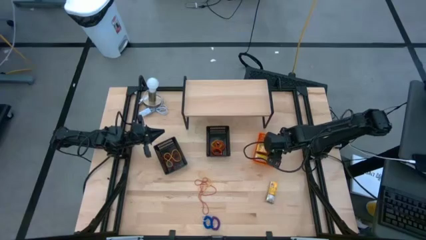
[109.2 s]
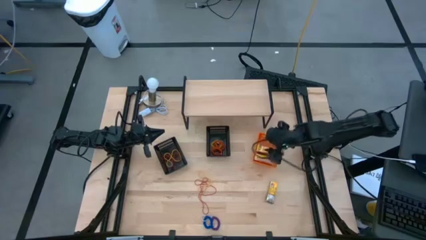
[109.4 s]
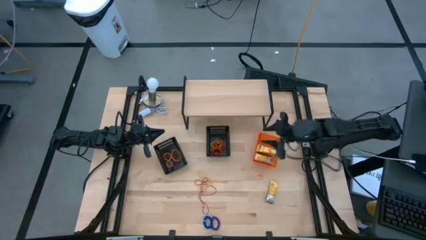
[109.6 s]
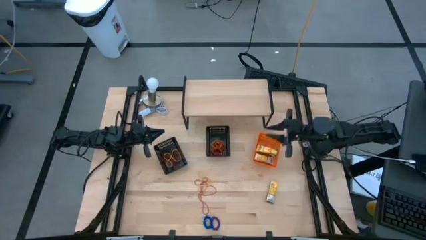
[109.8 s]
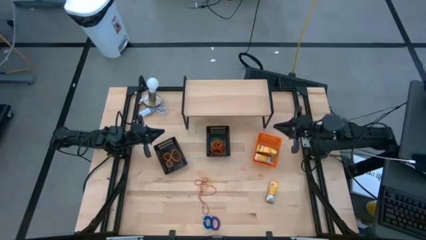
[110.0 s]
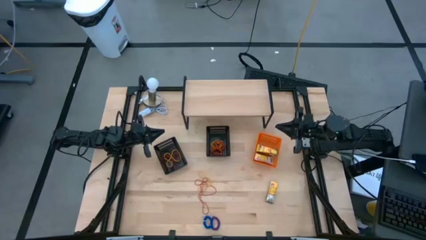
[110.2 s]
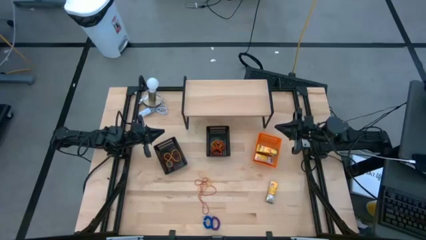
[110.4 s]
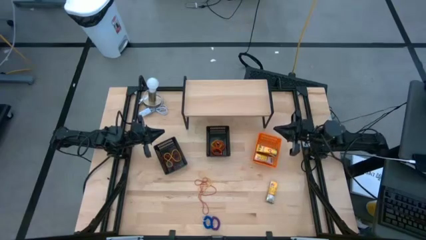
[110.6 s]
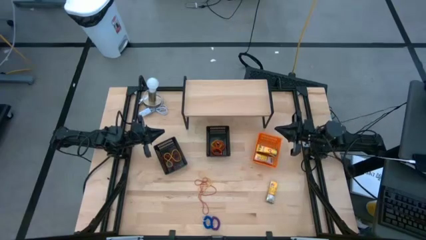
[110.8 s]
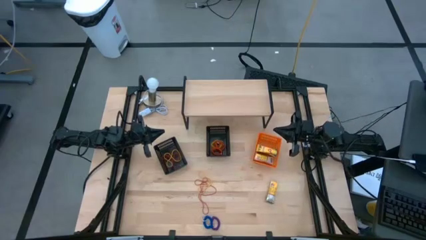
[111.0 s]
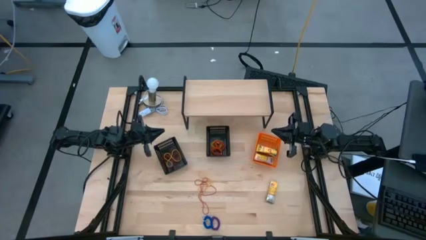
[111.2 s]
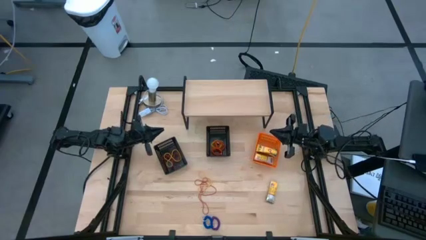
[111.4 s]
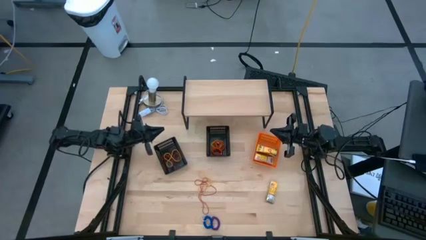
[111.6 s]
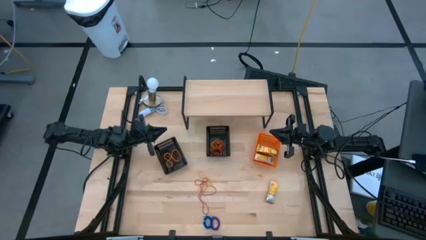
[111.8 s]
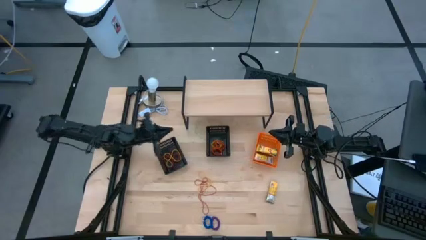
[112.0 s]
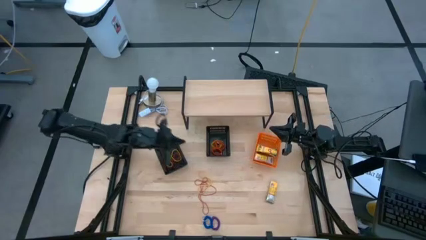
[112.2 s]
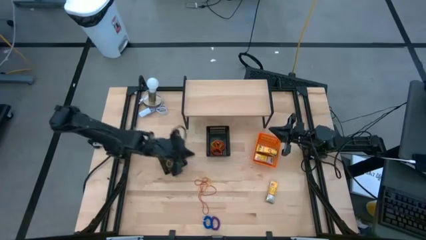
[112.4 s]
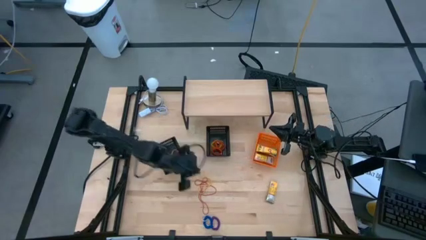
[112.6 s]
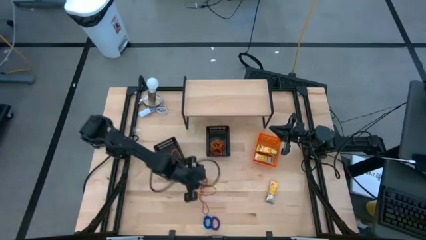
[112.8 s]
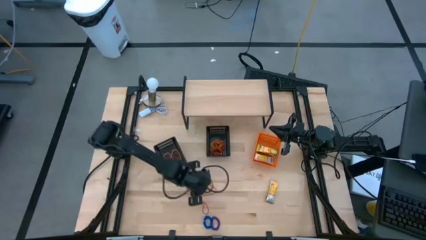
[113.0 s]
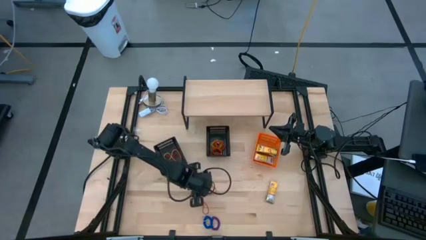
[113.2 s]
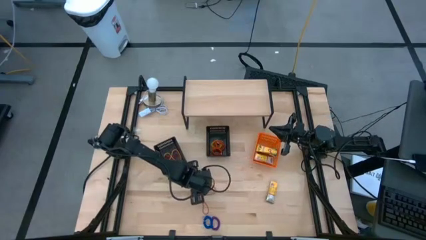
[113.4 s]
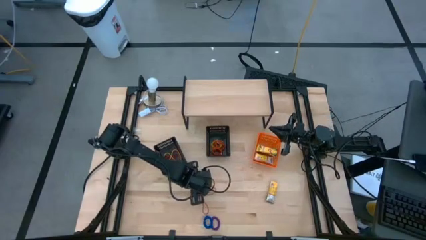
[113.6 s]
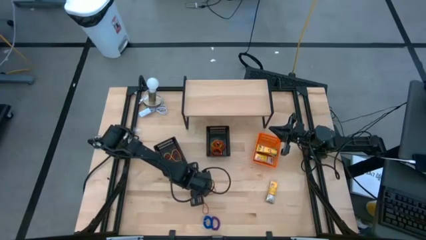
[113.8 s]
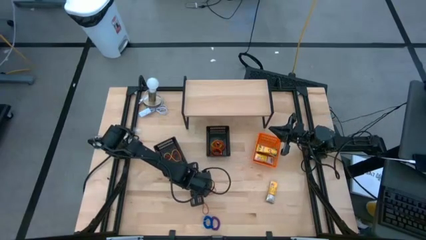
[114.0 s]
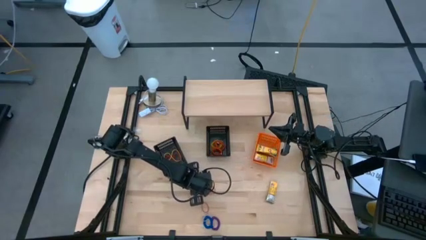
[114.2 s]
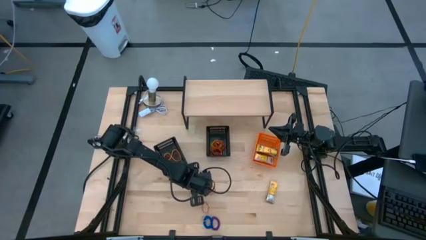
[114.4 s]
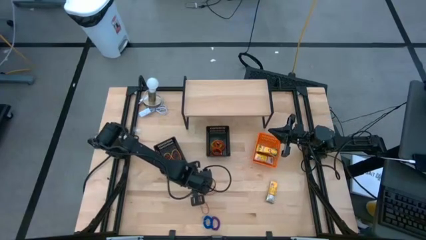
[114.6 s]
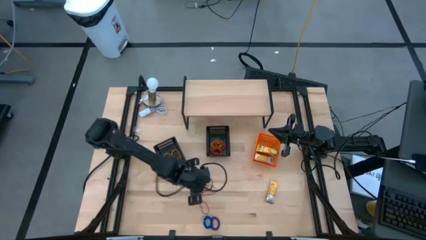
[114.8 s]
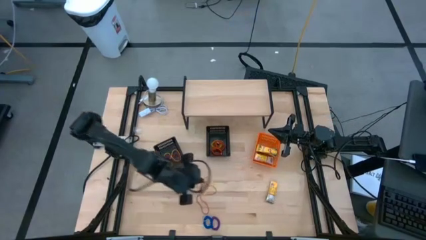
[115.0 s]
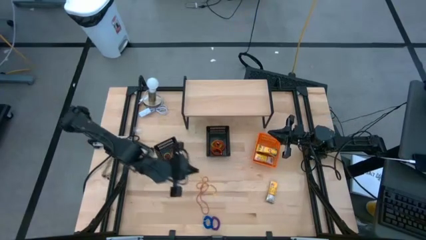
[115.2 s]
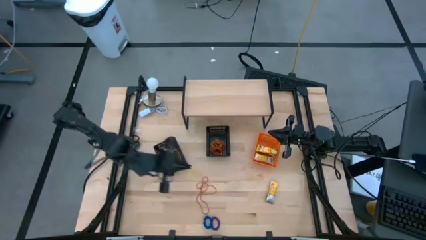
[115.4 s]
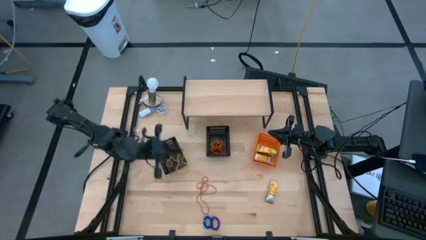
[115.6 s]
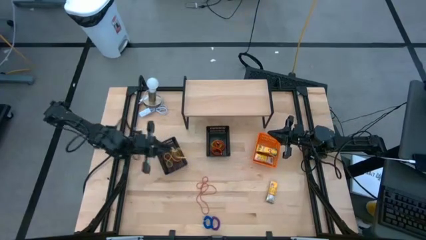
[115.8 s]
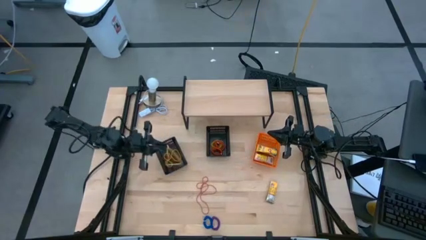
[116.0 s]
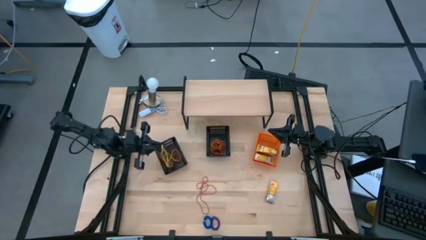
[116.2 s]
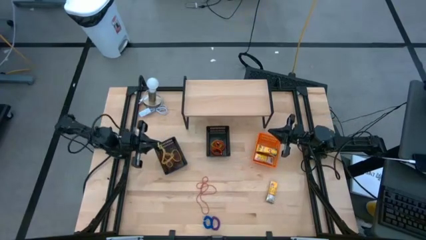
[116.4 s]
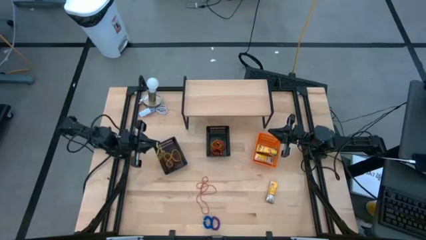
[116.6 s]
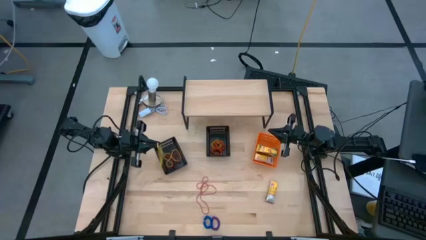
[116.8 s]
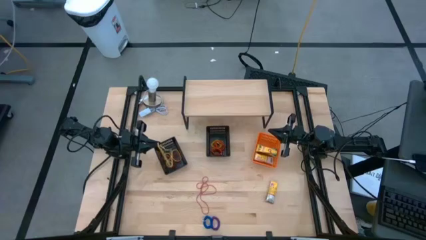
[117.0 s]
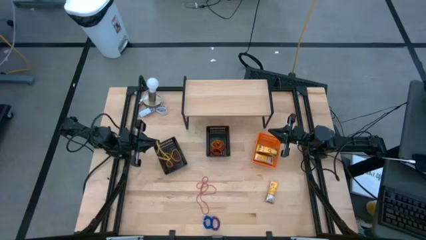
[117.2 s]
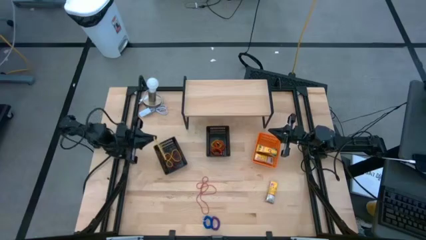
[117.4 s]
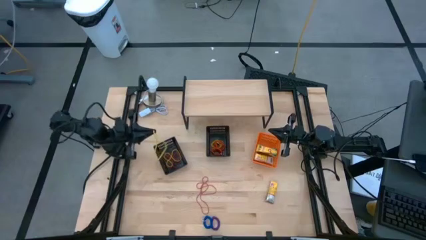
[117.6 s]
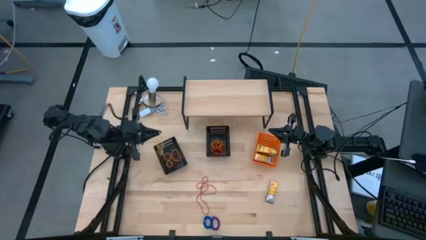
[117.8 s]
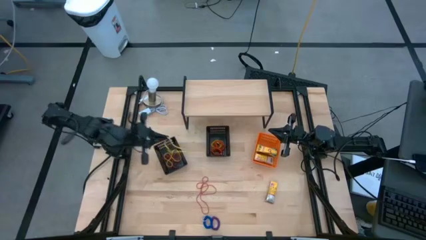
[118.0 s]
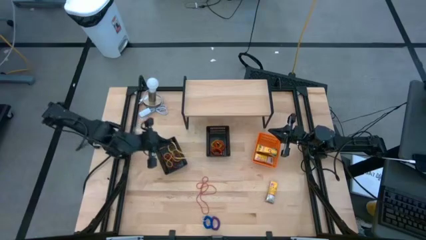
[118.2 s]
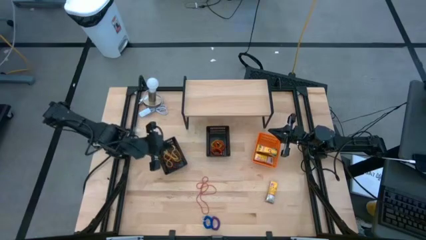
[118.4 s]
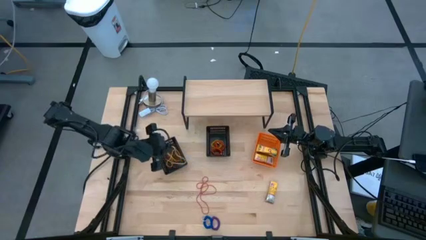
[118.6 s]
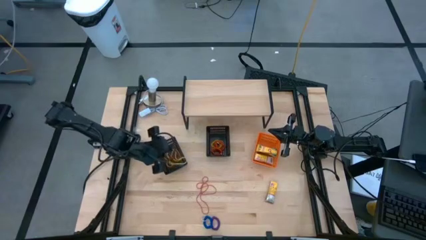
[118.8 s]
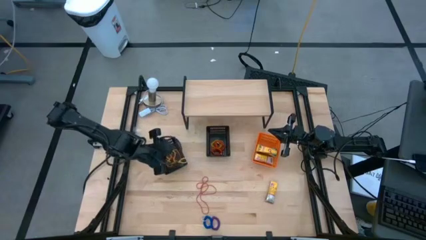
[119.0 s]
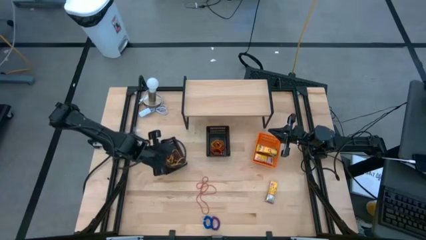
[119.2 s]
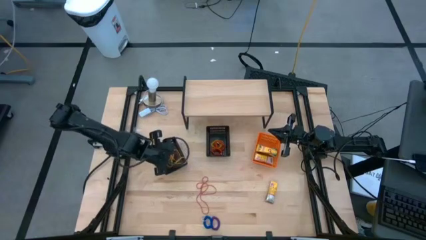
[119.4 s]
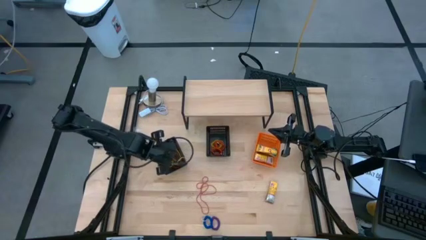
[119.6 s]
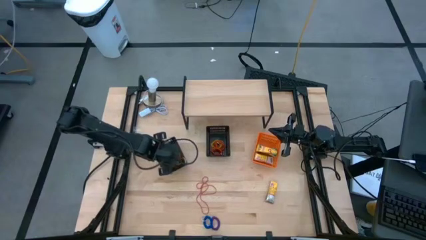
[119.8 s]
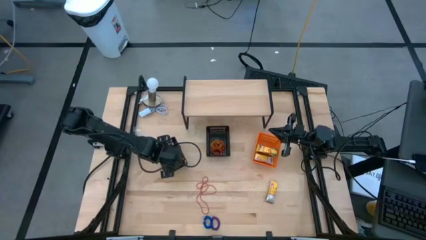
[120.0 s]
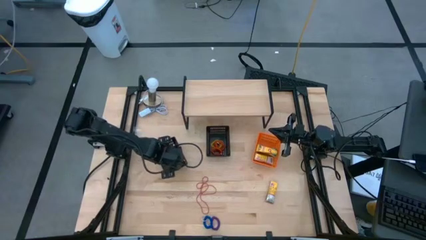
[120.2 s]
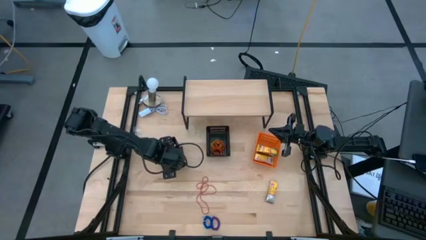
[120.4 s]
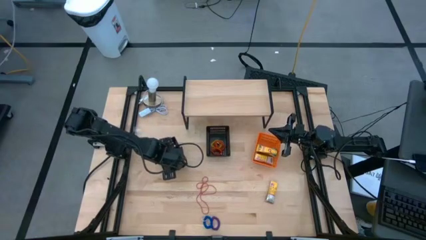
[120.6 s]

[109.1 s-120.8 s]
Task: Pick & Place Office Desk Supplies
Put the yellow rubber band into the left black basket

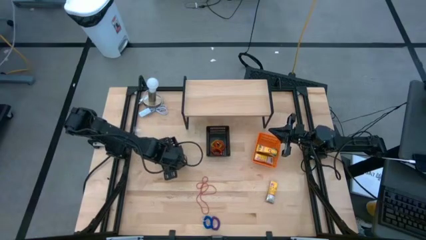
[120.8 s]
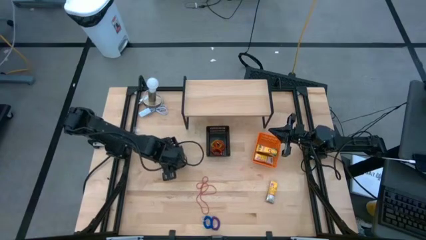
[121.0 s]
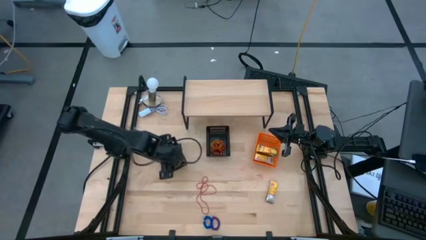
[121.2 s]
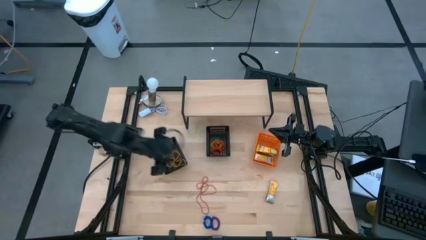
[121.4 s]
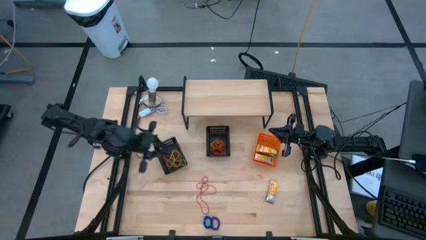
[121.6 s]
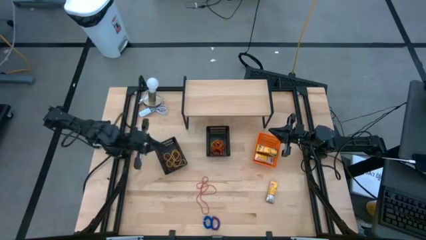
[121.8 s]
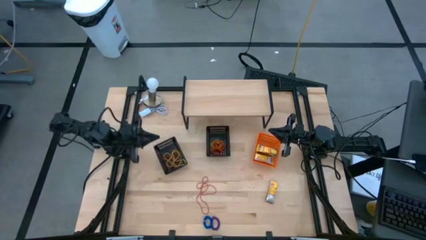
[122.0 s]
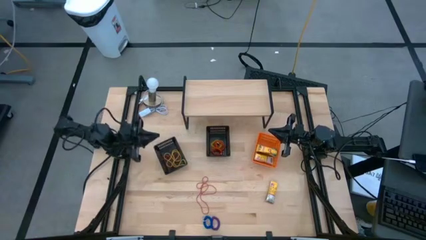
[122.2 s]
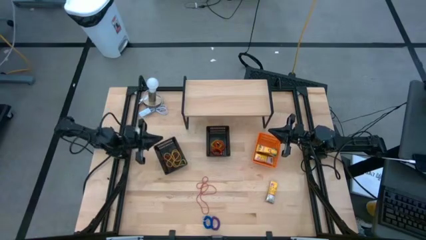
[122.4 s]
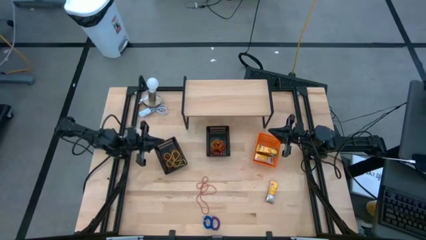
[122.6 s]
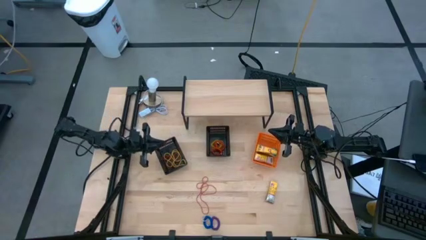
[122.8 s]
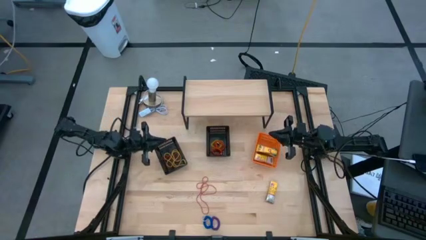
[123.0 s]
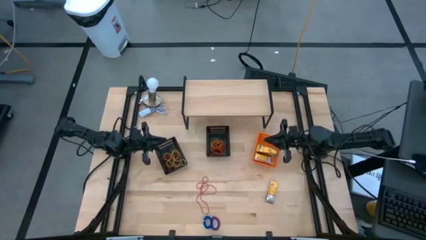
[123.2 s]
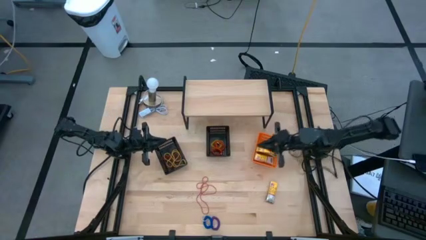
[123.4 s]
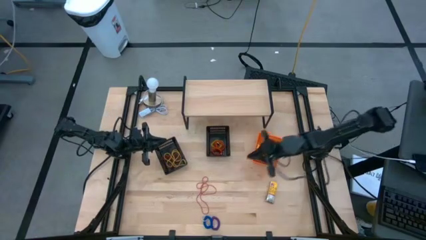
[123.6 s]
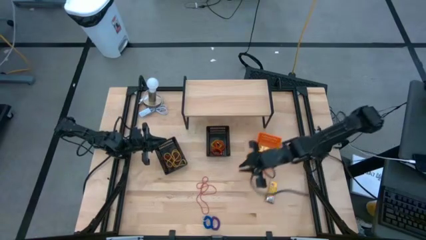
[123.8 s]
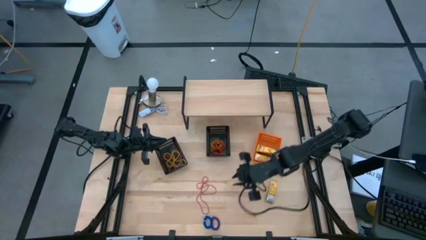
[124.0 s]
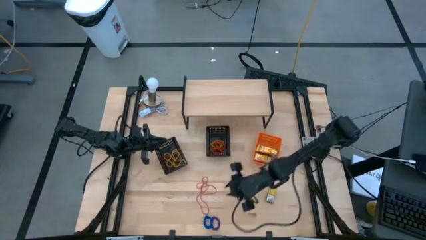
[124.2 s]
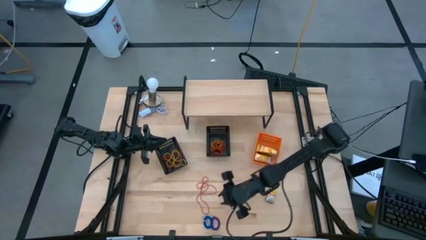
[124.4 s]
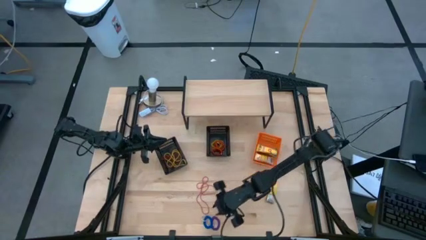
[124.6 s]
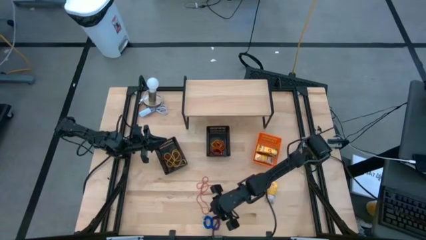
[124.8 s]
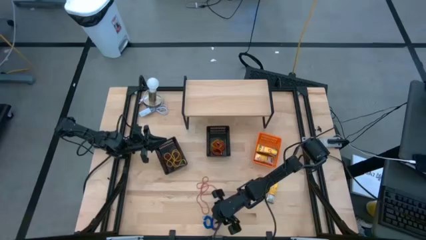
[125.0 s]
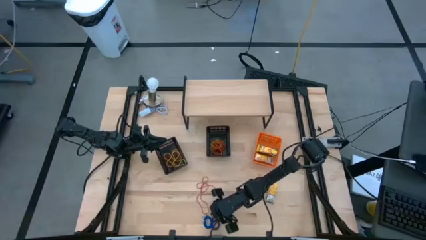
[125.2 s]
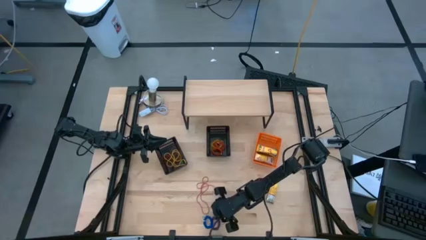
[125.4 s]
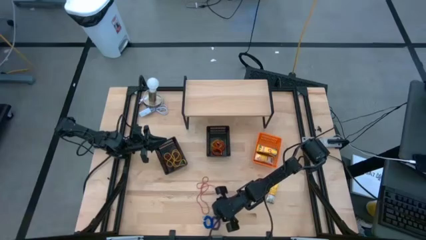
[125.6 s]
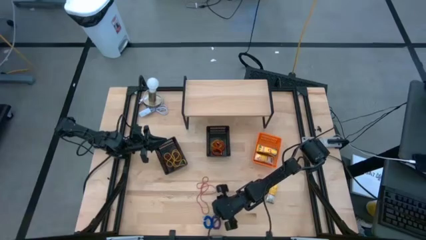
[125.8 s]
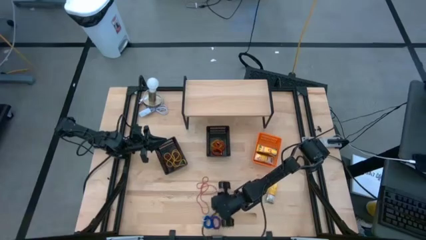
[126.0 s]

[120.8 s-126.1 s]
Adjust the violet spring keychain
